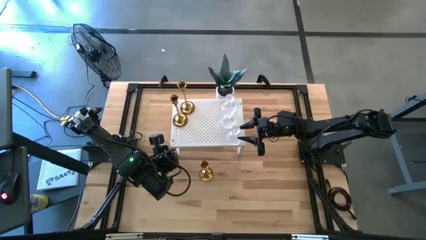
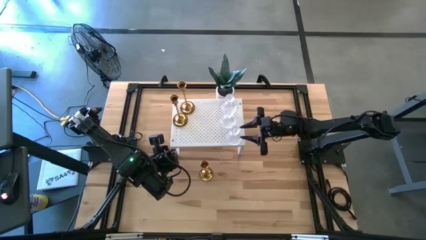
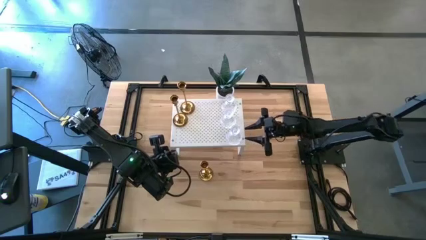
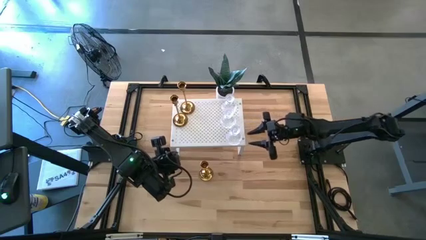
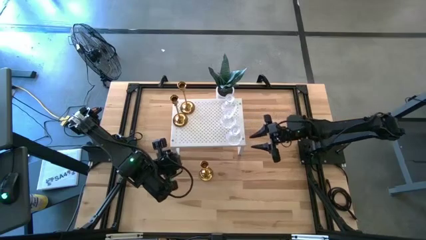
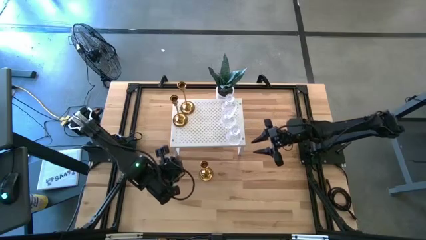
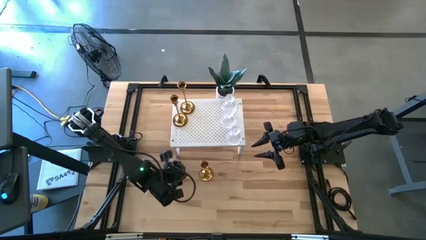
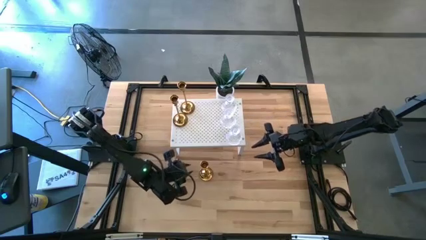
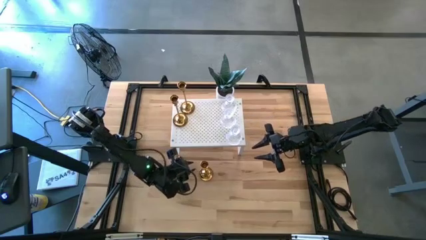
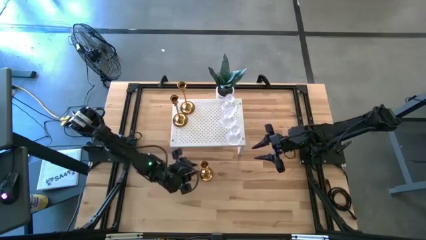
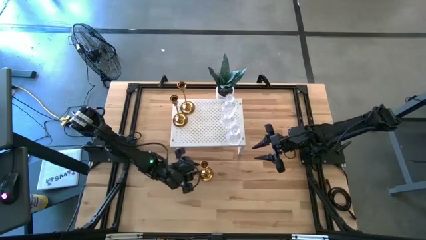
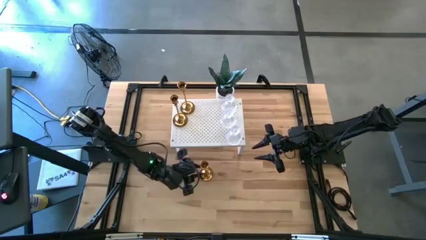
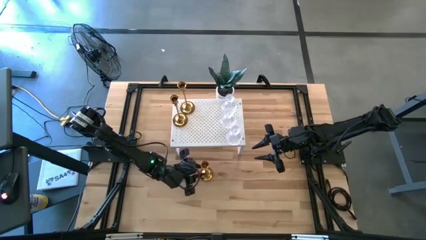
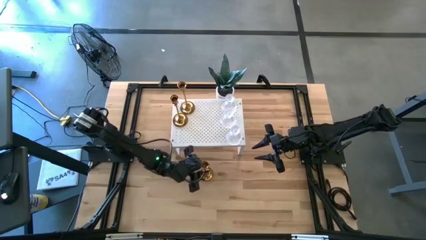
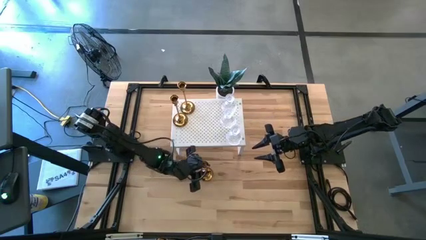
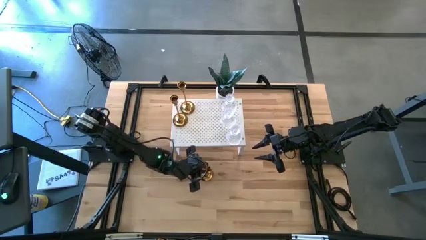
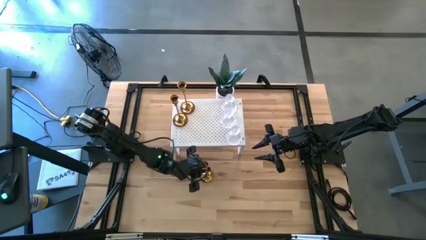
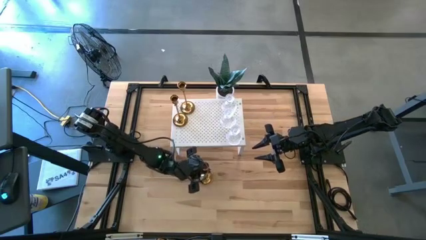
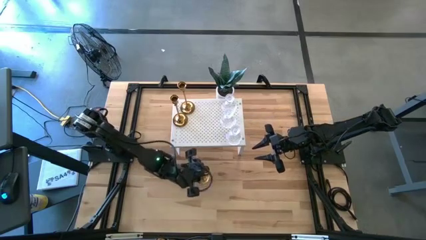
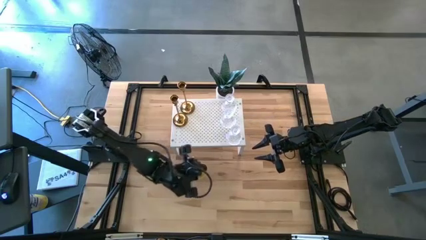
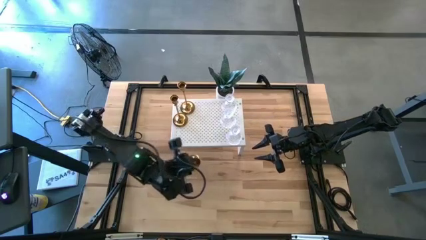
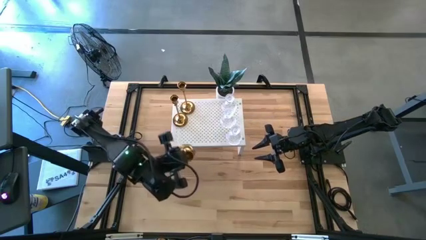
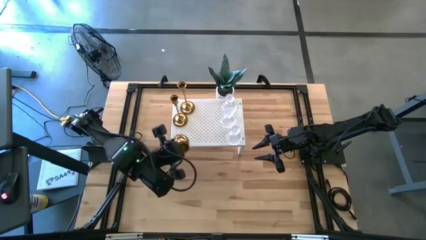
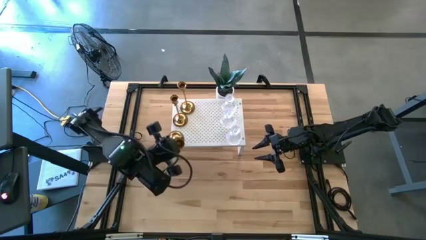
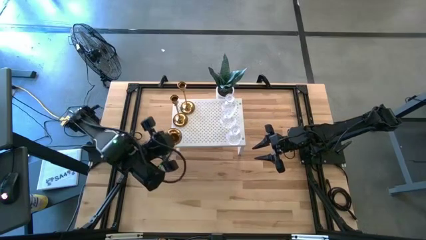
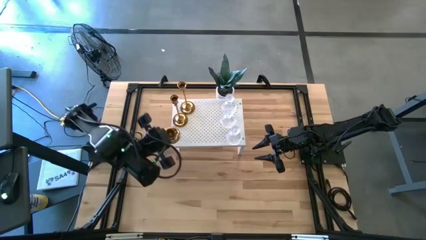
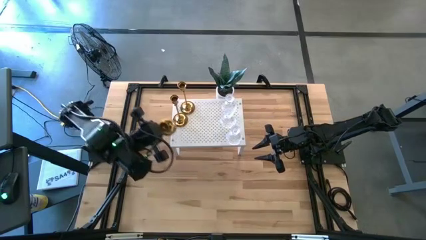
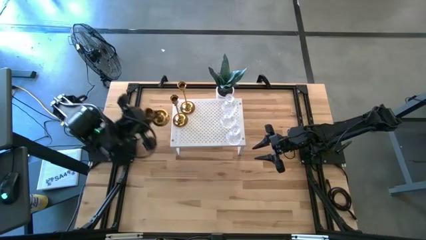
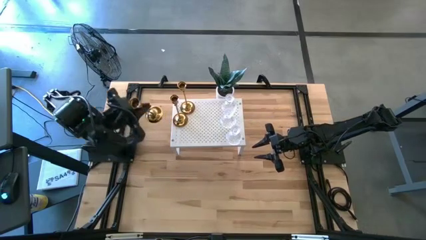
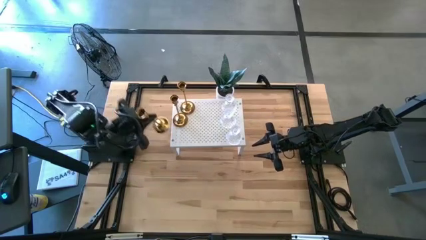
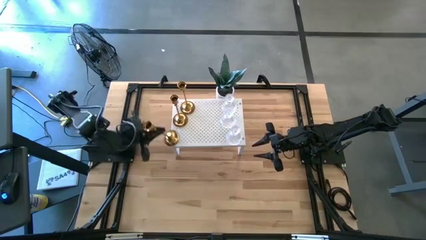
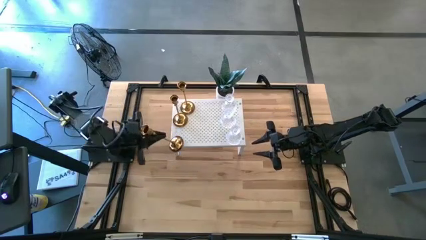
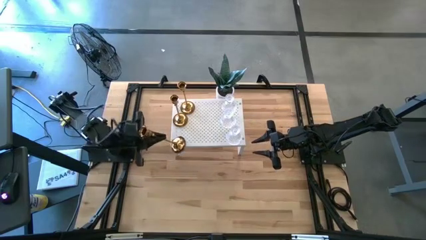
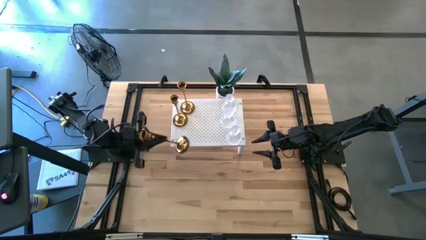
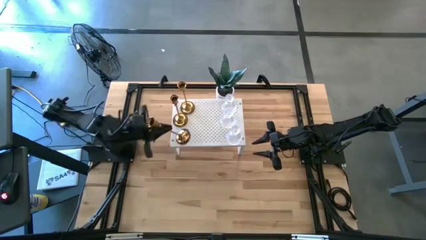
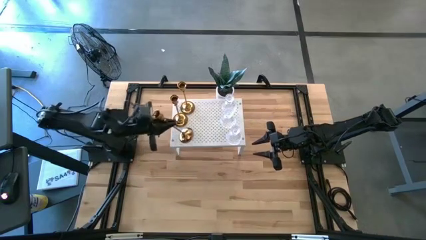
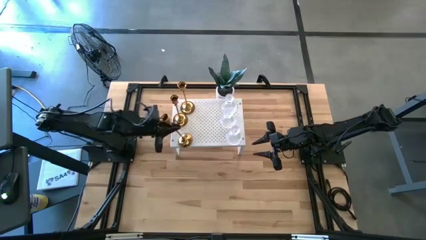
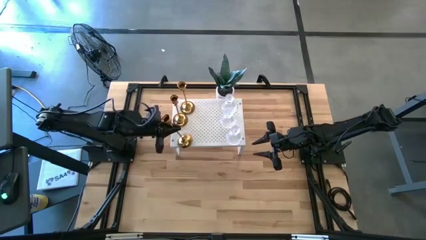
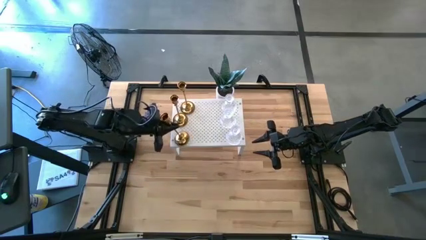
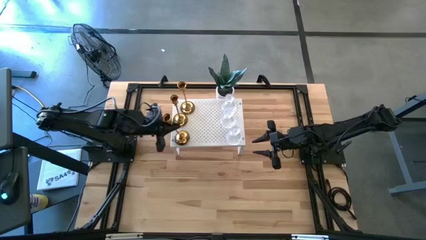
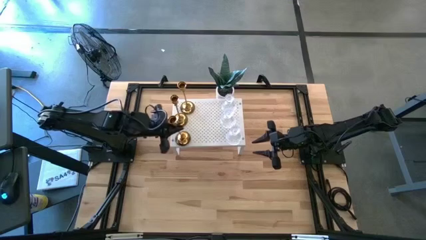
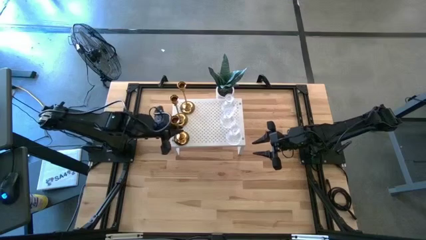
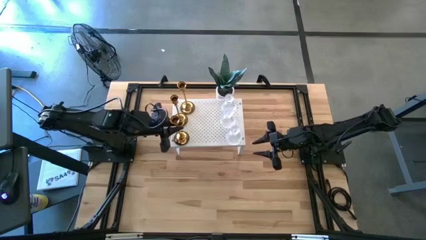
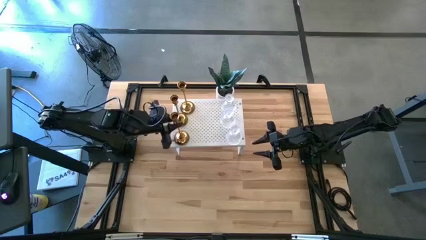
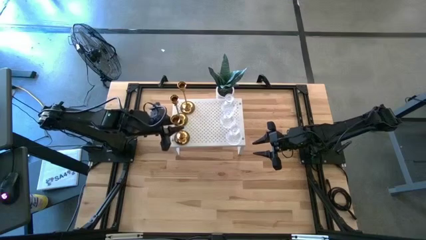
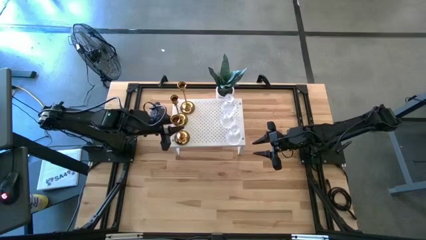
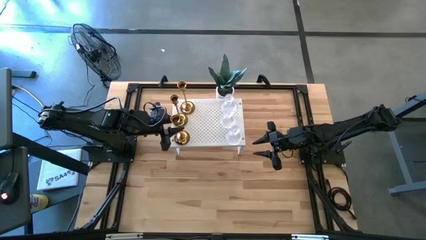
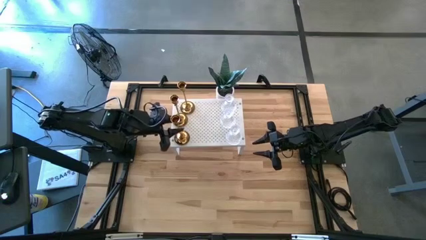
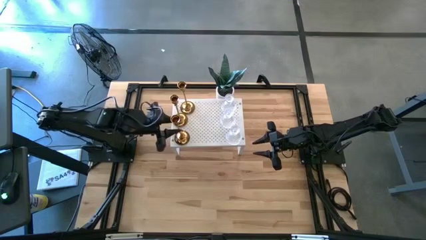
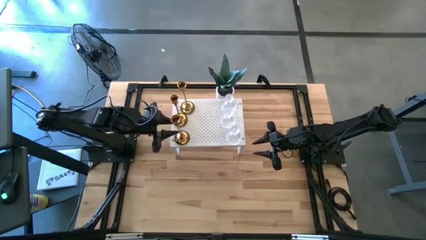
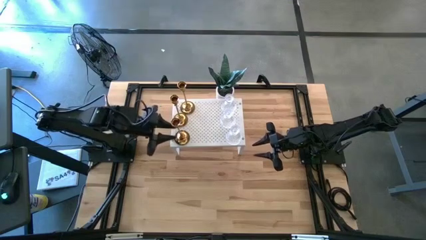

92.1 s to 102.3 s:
Task: Pick & Place candle stick holders
Put the gold candle stand on the shelf aligned with the other gold candle holders

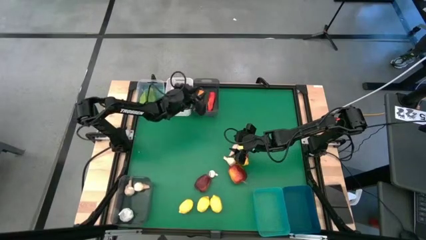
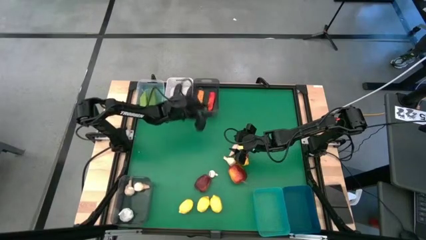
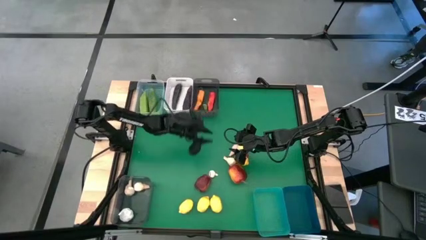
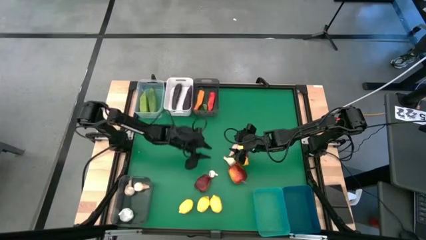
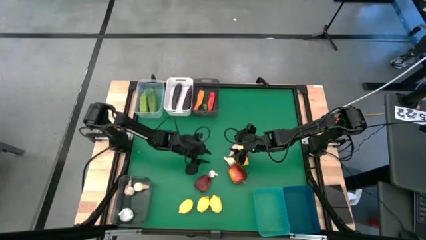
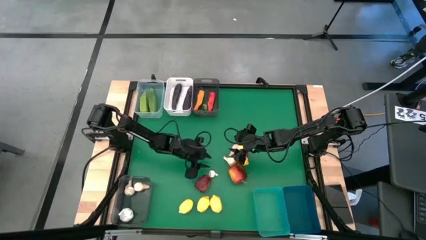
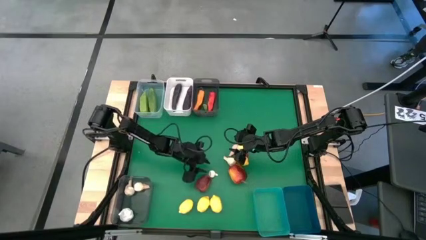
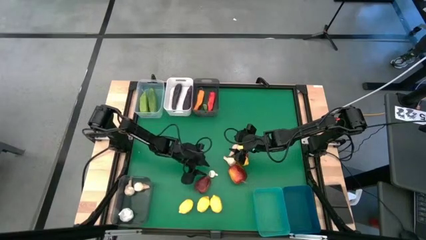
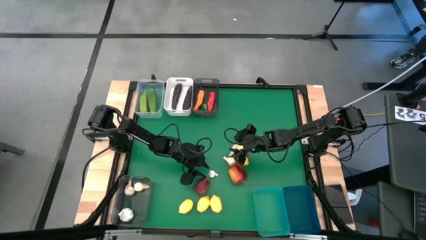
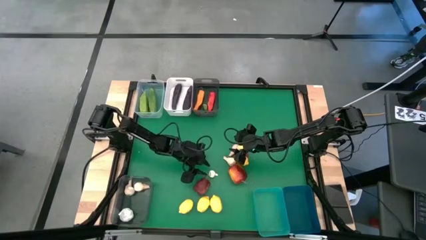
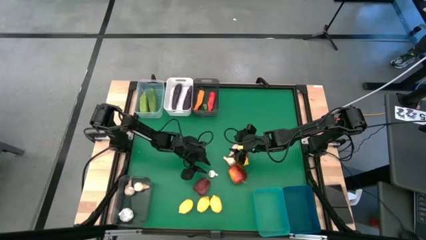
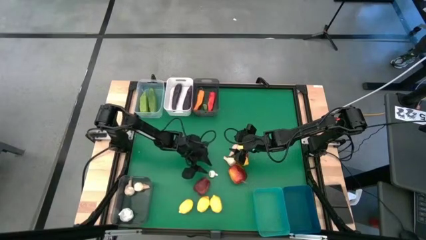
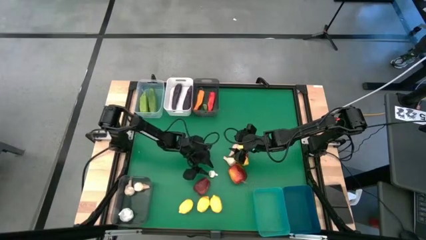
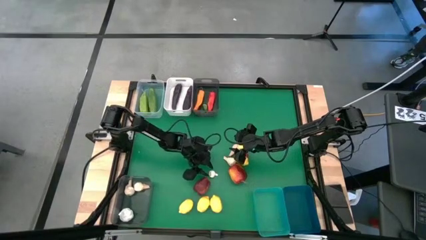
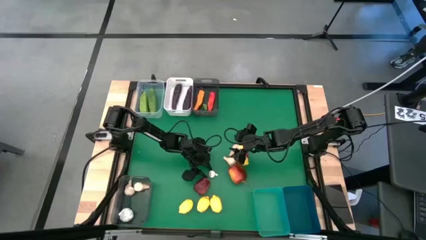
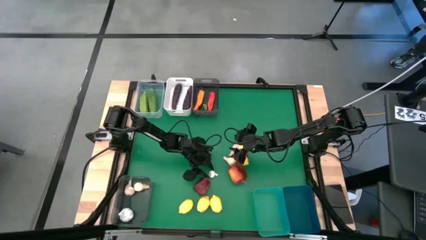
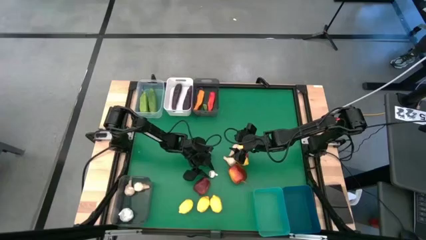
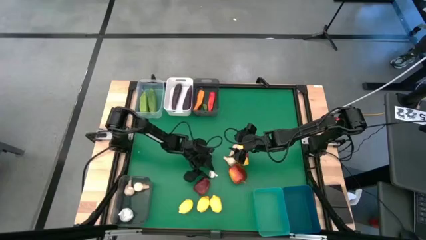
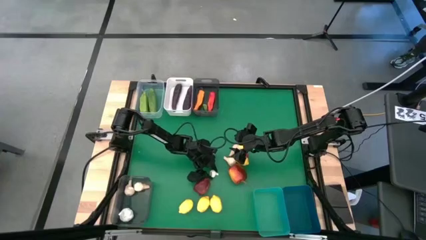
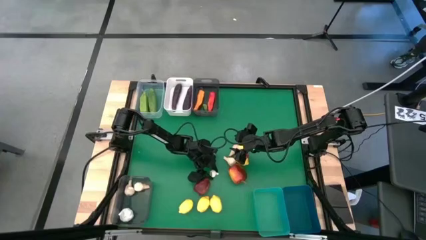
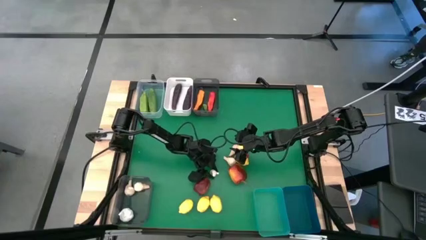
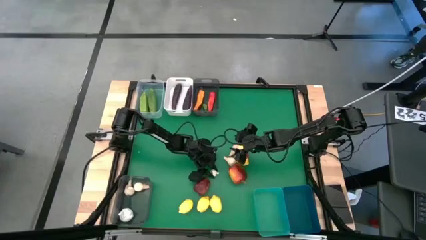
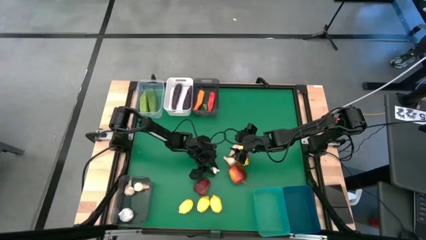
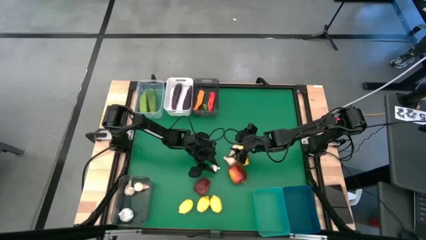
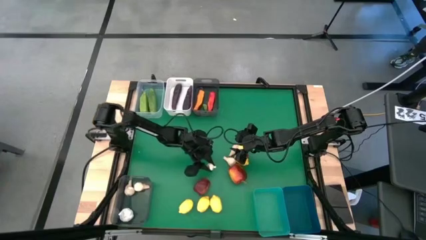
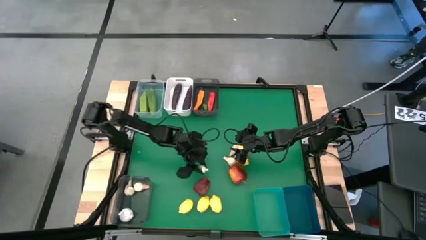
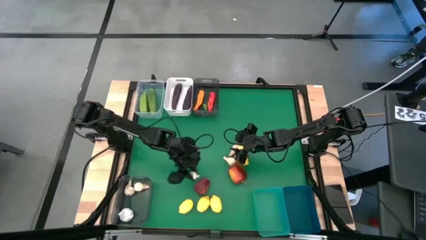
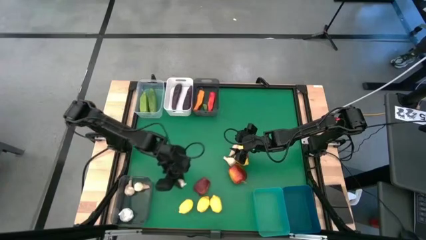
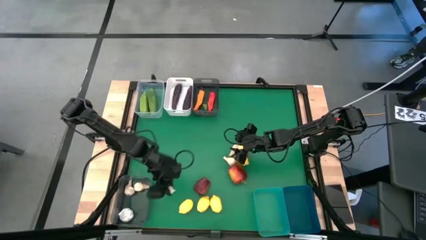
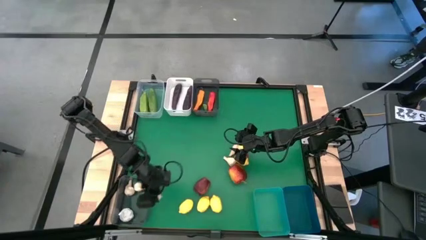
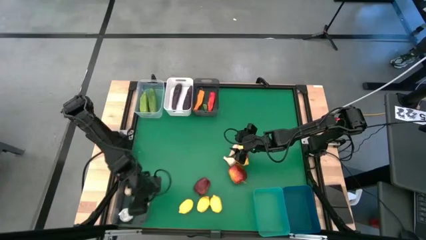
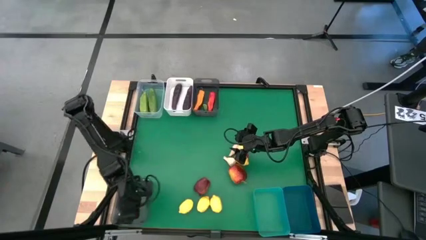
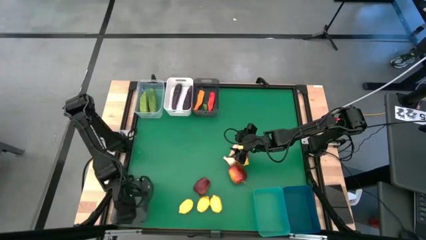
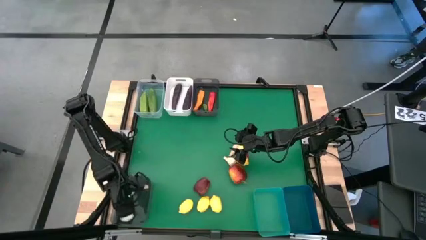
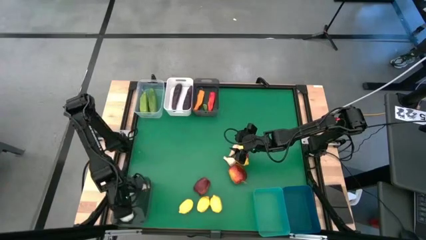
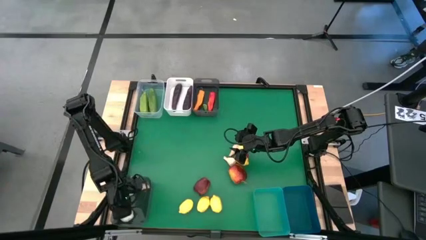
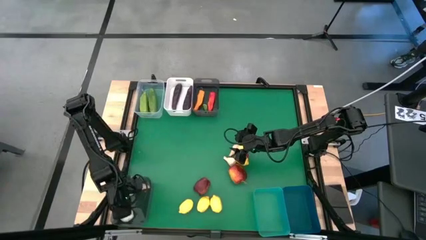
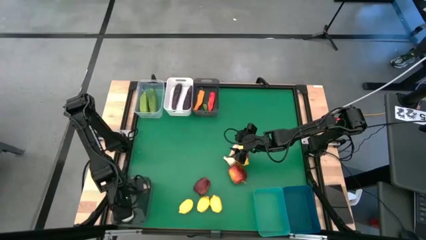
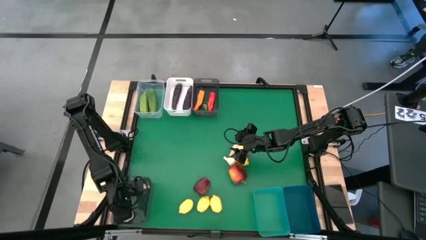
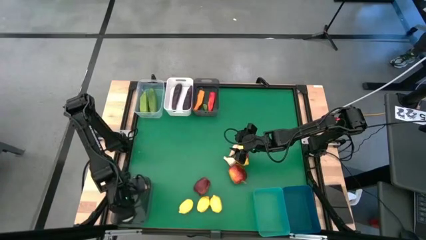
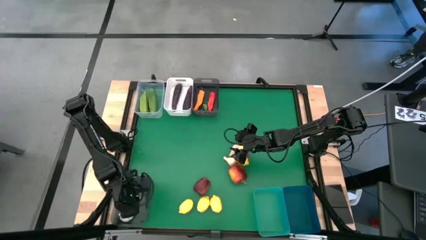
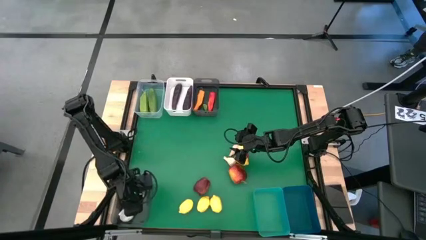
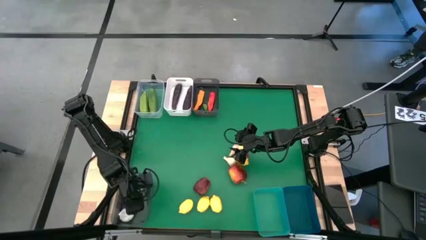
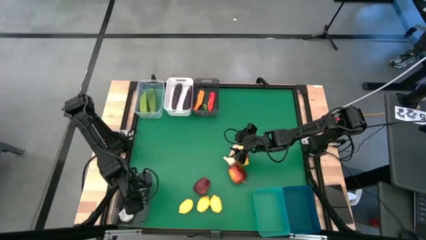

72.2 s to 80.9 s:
Task: Sort produce into baskets
Put the white garlic into the bottom black bin
